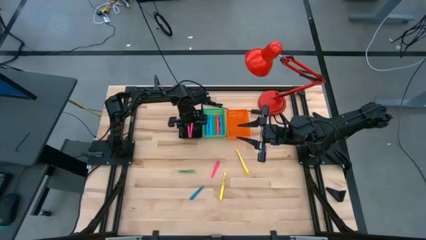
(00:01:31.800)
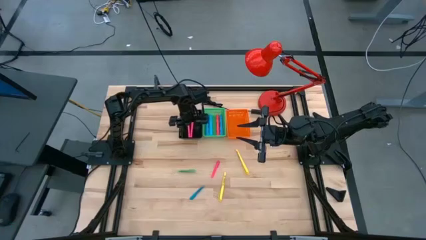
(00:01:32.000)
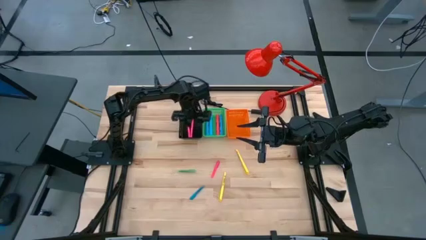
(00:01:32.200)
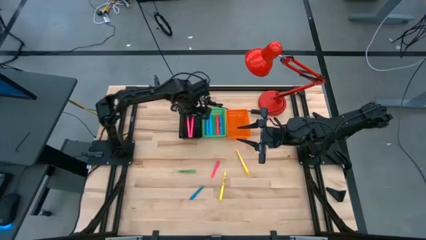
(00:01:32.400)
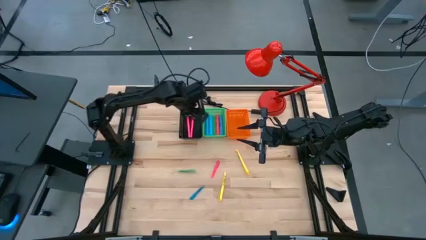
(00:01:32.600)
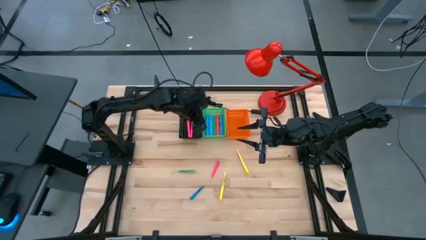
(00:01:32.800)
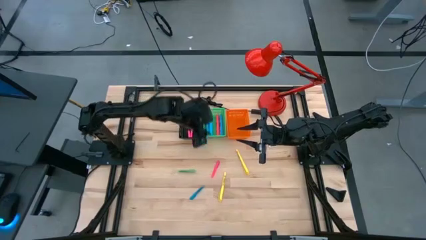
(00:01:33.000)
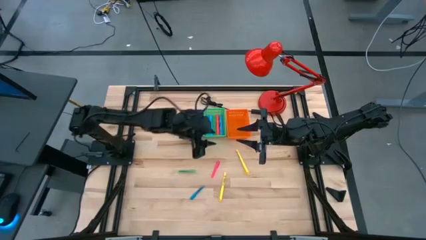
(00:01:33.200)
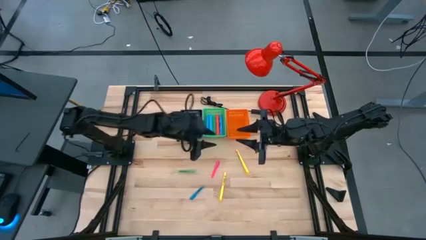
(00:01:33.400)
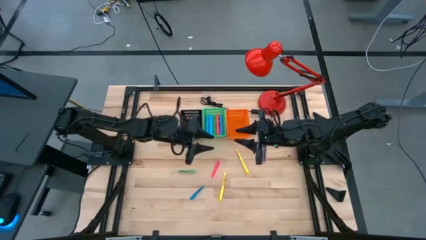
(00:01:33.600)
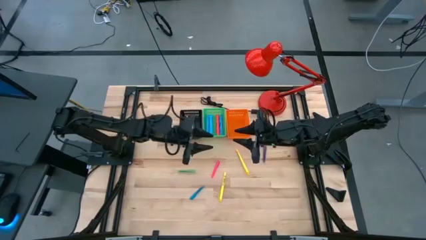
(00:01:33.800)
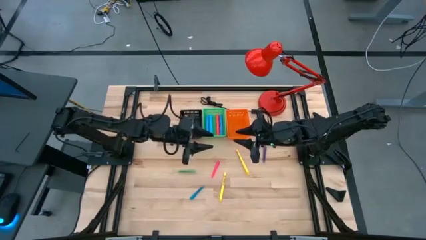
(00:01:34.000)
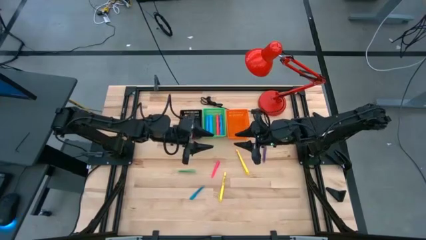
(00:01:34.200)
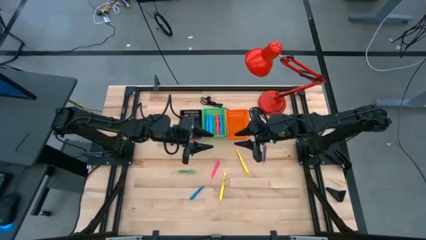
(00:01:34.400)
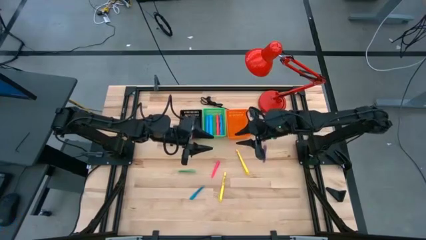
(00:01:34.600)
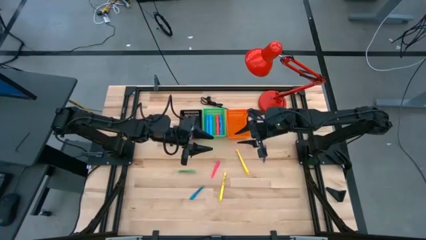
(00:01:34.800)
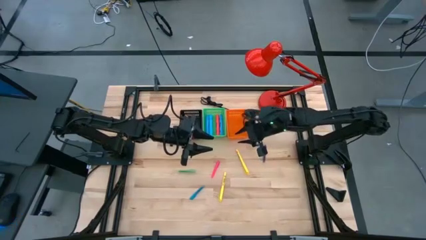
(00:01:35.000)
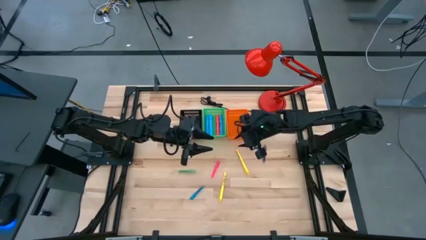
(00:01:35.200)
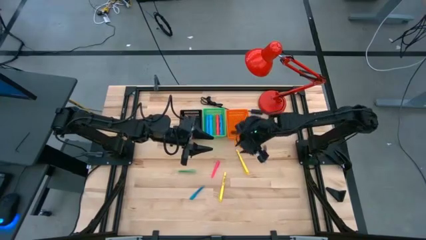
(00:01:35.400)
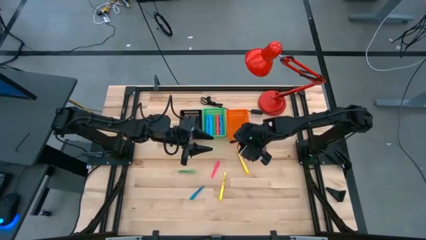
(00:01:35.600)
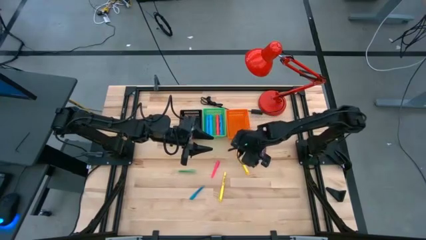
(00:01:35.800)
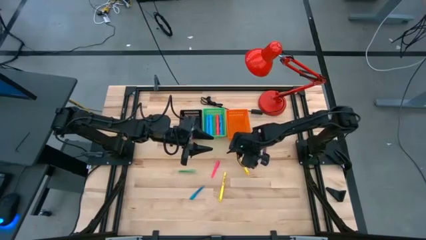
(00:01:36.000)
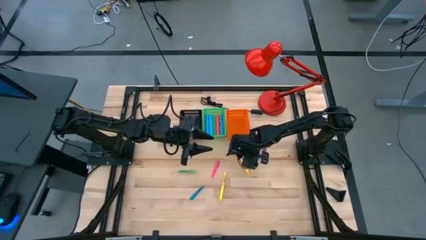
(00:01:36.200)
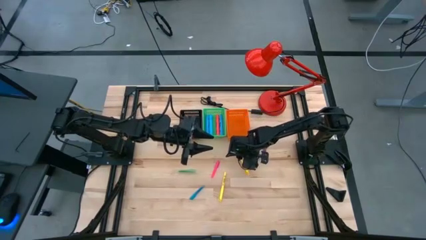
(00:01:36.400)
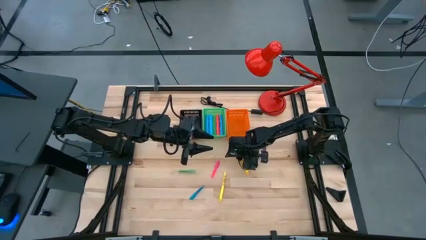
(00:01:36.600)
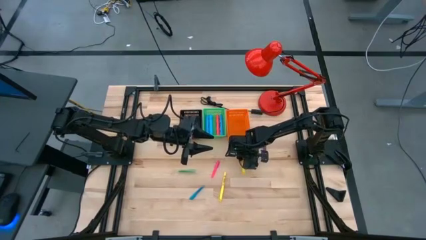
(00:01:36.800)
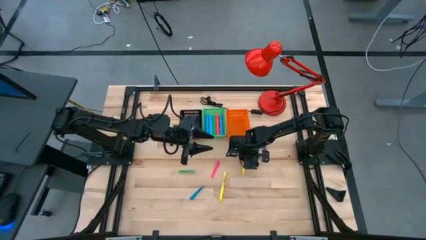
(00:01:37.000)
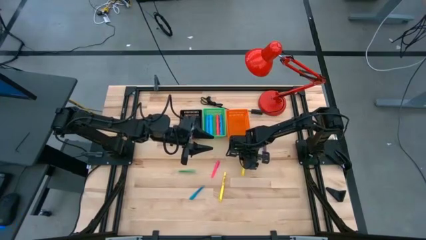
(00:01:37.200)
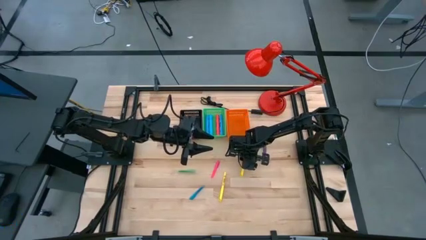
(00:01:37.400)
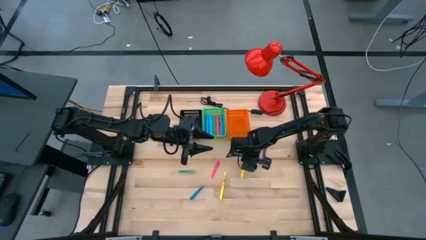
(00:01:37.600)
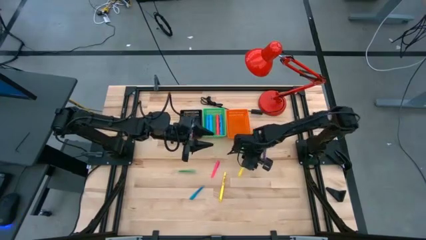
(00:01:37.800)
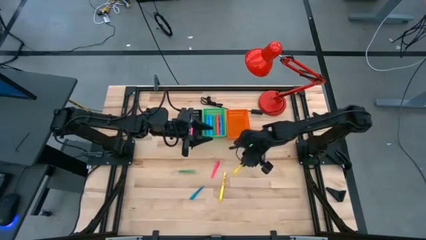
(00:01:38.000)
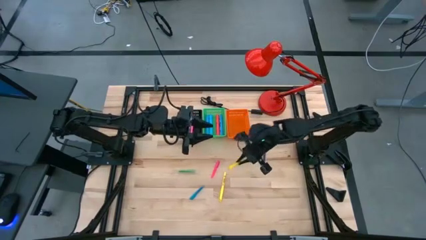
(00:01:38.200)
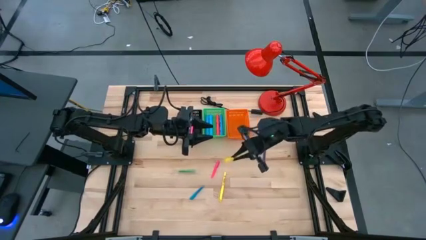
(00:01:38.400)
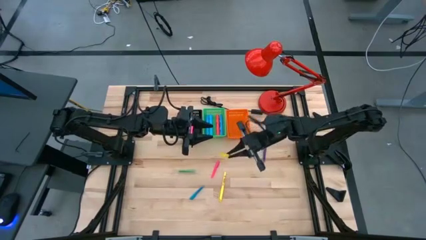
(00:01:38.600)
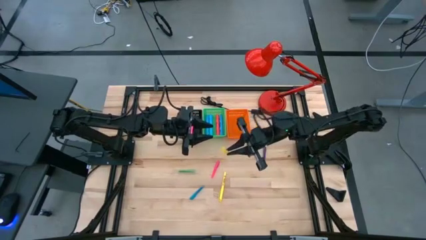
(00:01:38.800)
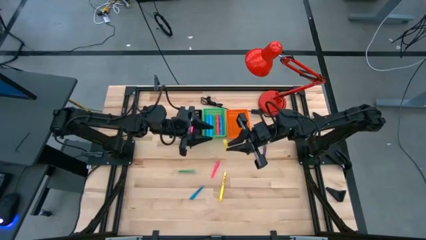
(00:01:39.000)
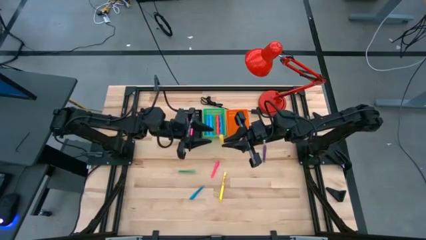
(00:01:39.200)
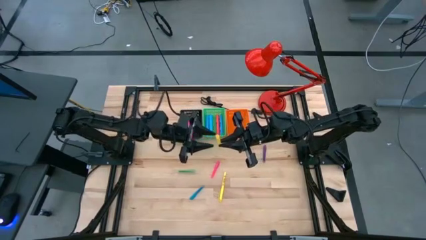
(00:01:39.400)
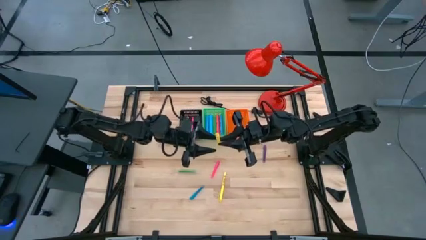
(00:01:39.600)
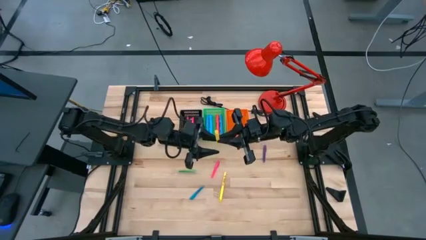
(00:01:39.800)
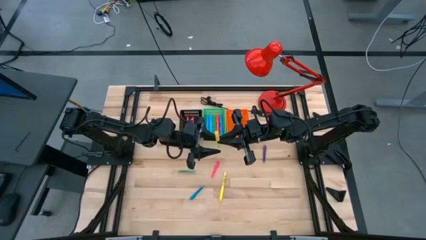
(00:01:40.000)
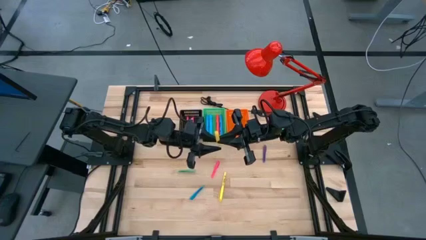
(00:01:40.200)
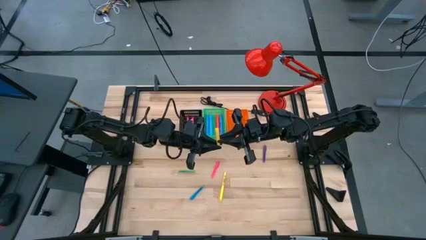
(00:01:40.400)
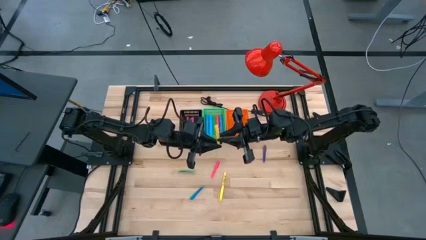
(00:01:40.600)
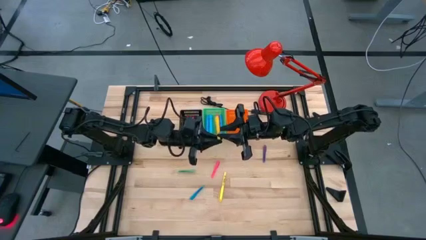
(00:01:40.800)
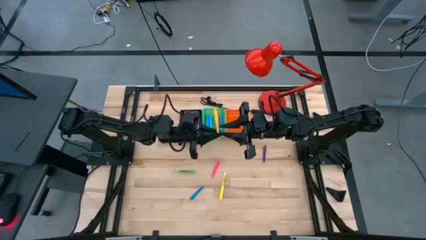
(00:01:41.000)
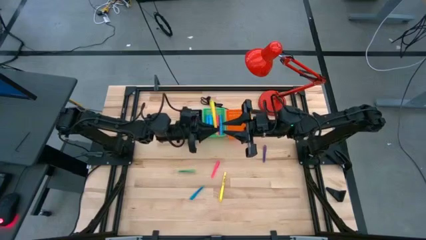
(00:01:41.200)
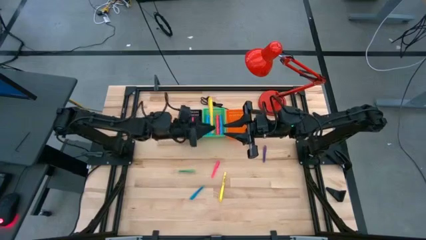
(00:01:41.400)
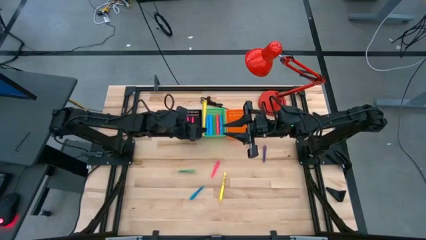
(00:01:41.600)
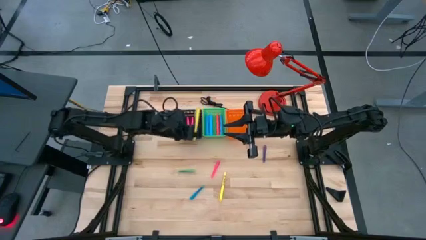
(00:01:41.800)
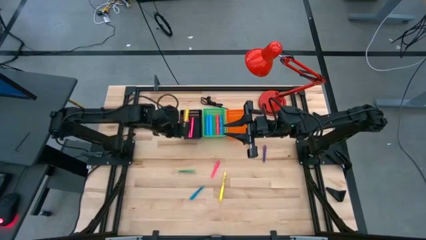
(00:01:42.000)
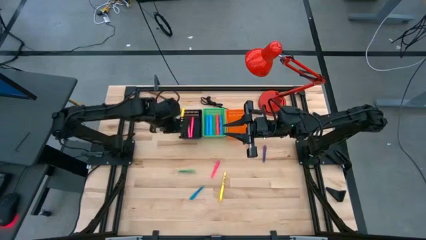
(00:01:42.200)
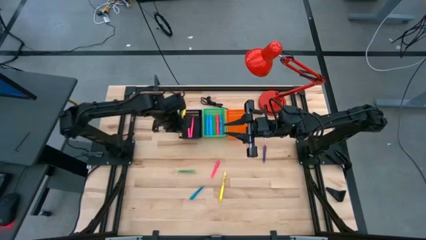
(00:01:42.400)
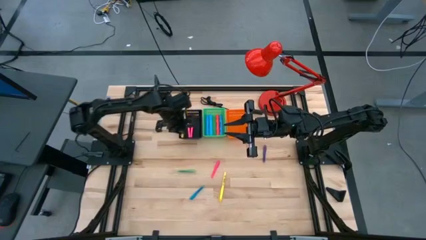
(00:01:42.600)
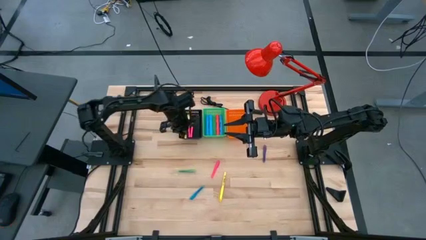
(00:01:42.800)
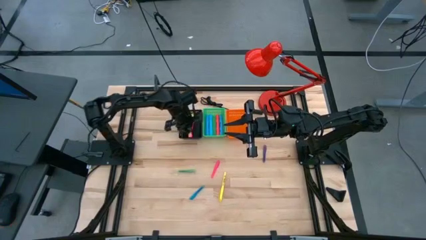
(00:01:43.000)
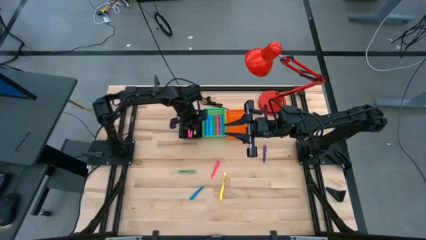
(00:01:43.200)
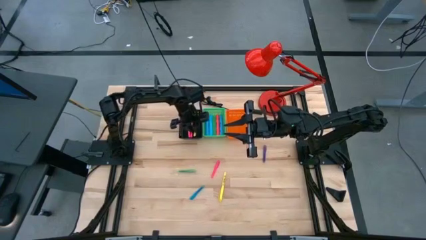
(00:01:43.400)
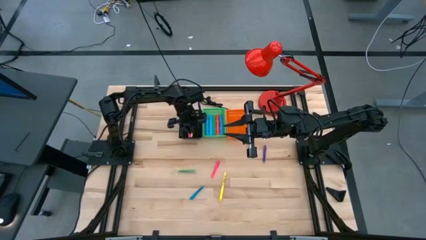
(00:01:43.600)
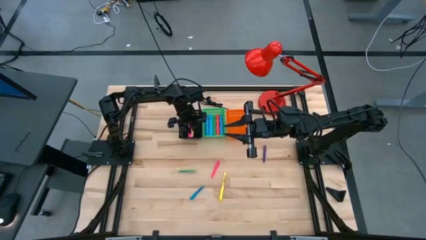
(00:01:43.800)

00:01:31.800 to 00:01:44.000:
Task: Pick & Place Markers
Put the top large yellow pen into the black bin

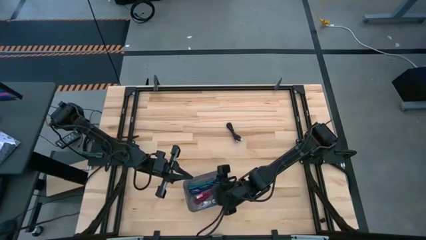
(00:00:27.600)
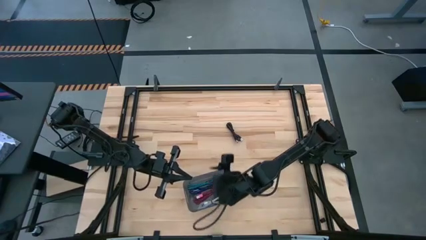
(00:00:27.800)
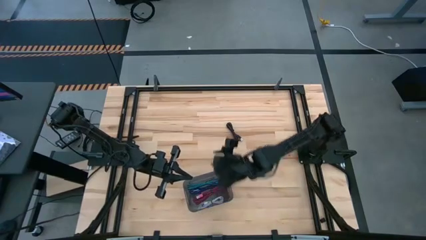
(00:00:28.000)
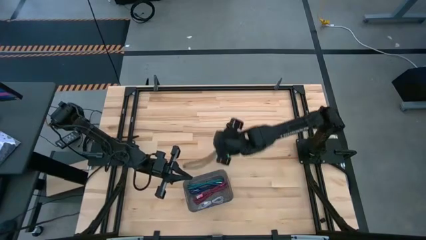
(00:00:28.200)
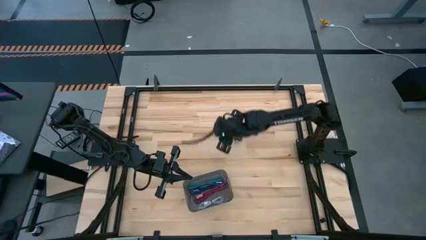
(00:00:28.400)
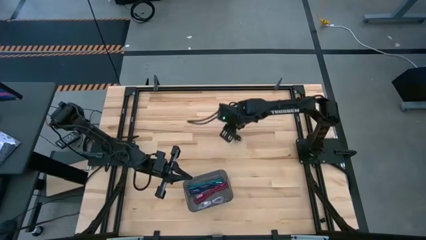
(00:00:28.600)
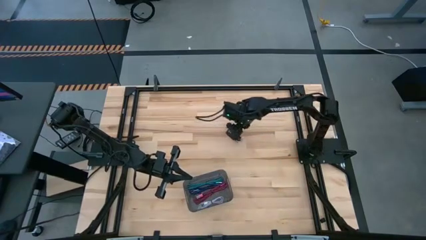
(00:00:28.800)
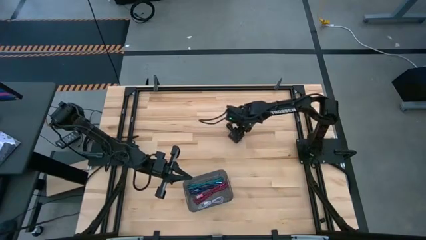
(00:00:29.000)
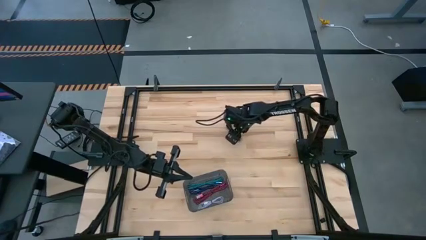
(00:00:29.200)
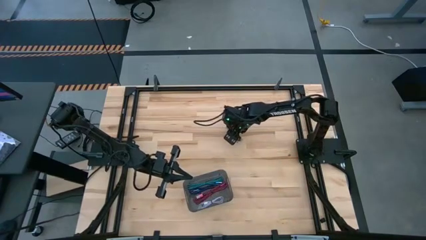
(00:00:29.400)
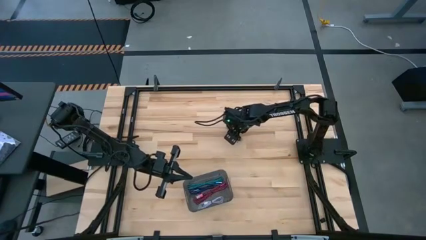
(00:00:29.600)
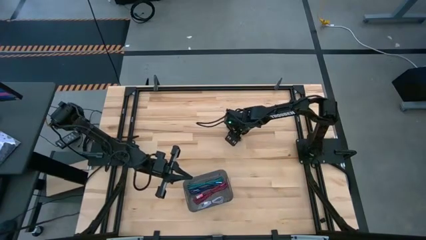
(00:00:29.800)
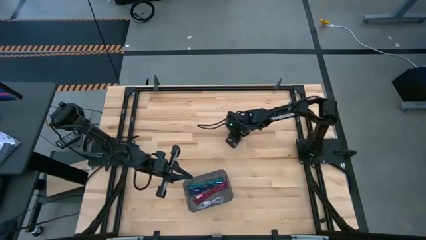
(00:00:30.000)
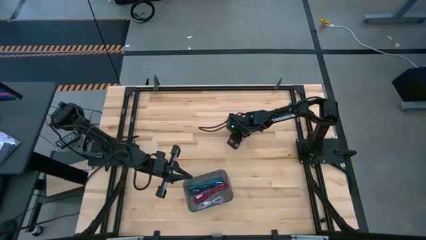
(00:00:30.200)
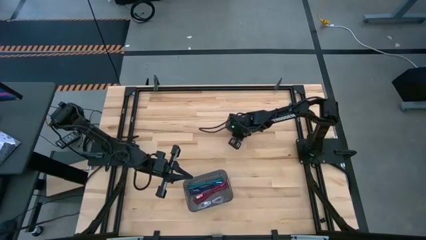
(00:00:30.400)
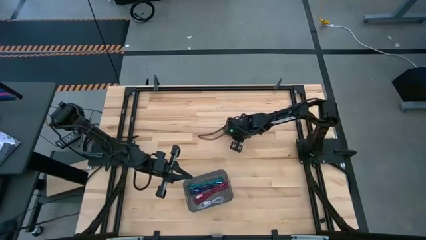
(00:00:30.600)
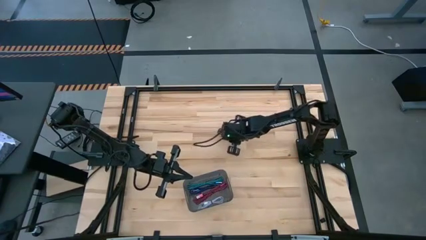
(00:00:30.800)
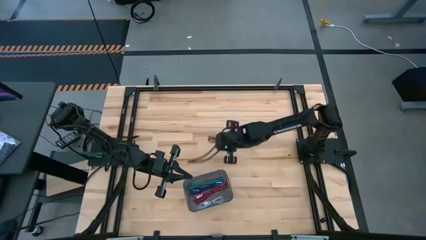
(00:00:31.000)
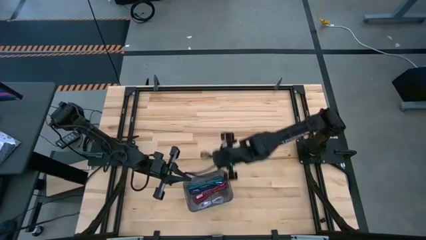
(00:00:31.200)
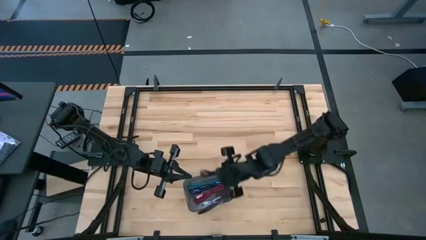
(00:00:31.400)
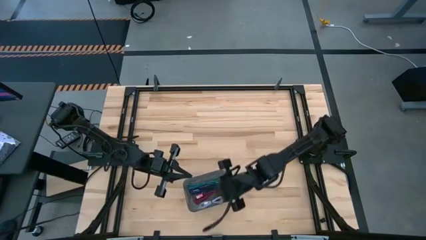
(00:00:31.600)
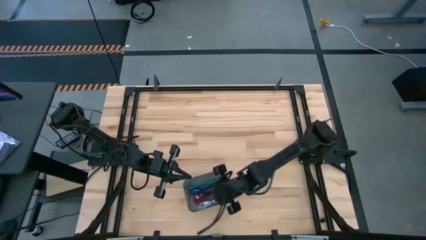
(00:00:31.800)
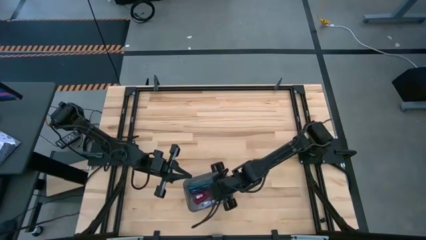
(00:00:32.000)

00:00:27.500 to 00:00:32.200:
Task: Pick and place USB-C Cables
Put the black charger cable into the black bin
